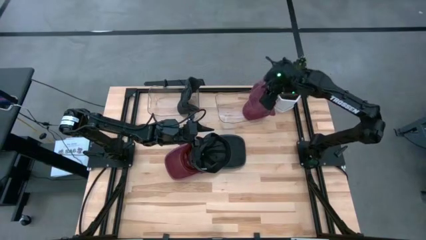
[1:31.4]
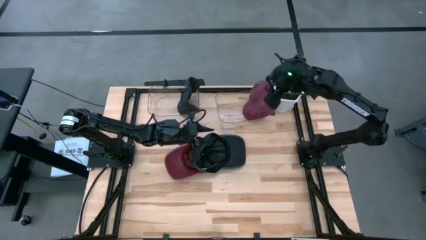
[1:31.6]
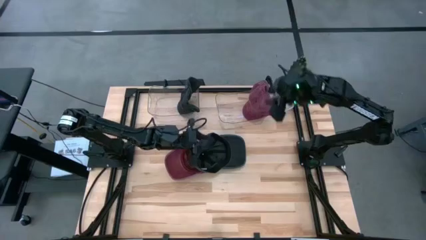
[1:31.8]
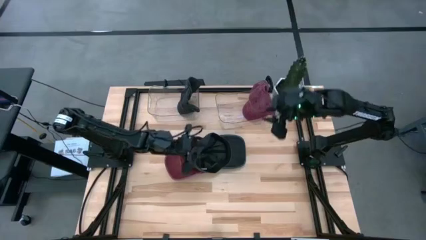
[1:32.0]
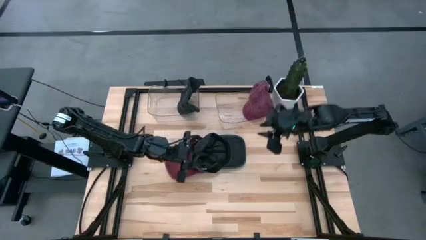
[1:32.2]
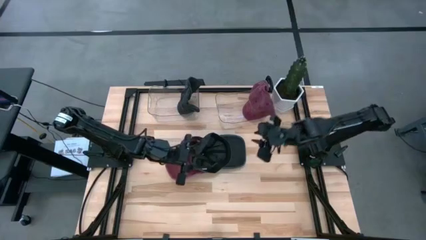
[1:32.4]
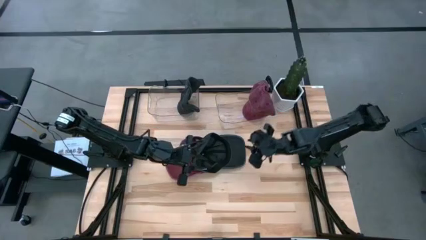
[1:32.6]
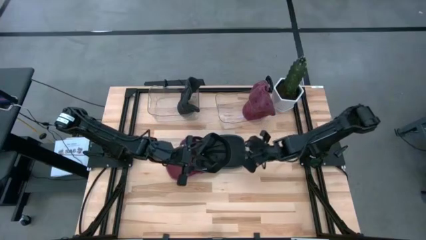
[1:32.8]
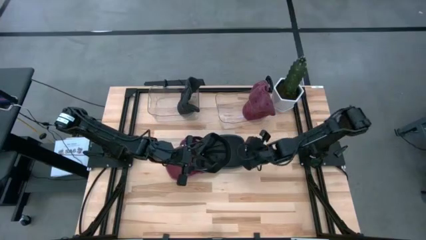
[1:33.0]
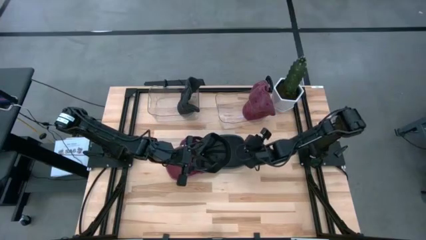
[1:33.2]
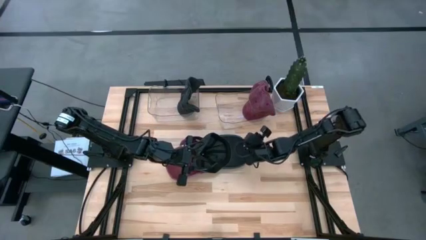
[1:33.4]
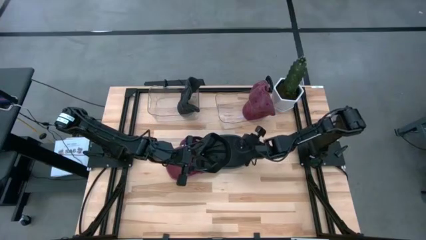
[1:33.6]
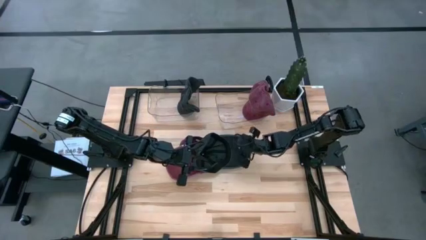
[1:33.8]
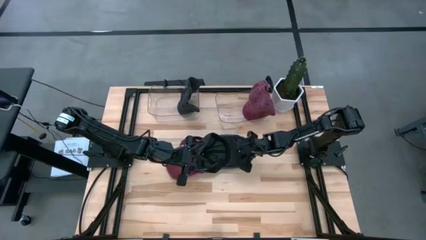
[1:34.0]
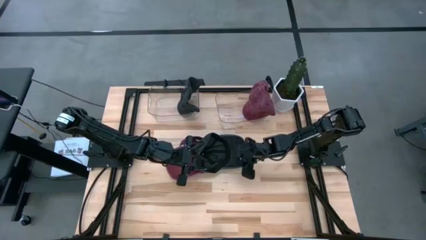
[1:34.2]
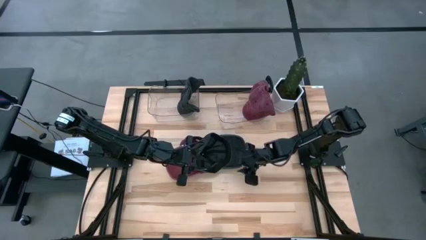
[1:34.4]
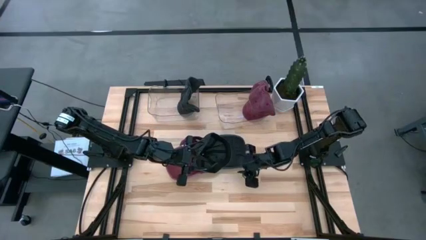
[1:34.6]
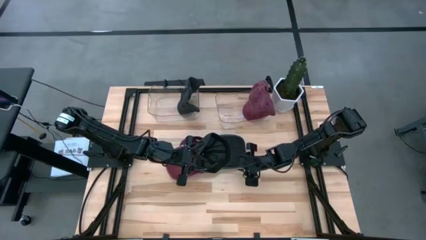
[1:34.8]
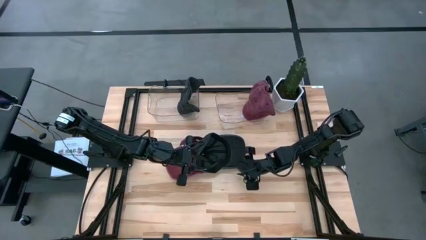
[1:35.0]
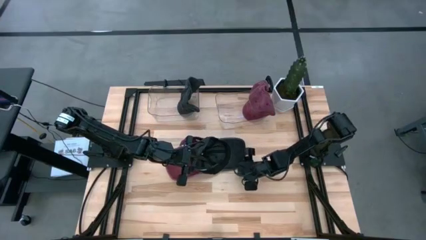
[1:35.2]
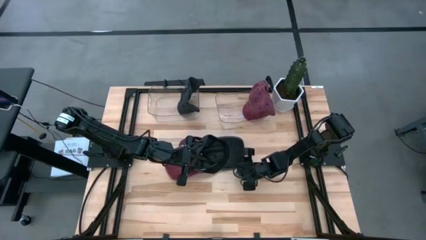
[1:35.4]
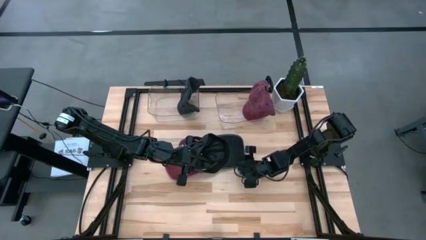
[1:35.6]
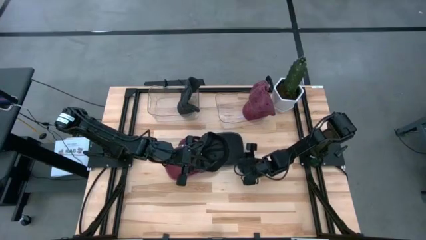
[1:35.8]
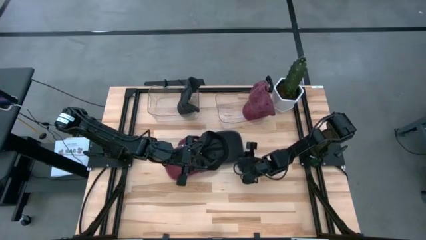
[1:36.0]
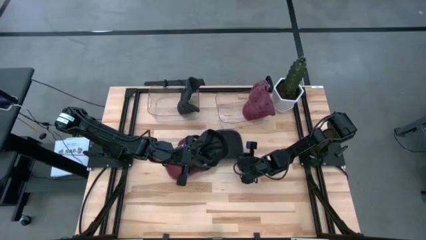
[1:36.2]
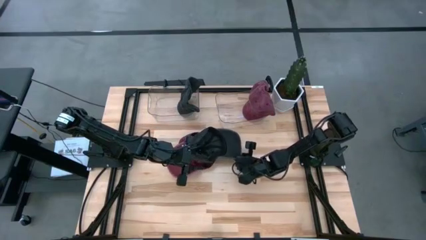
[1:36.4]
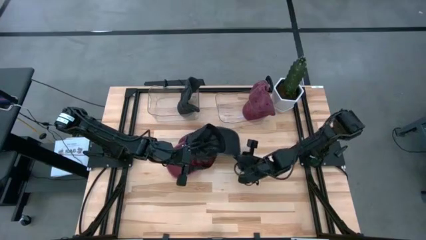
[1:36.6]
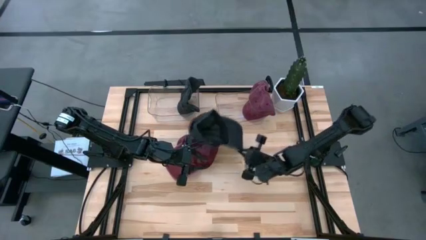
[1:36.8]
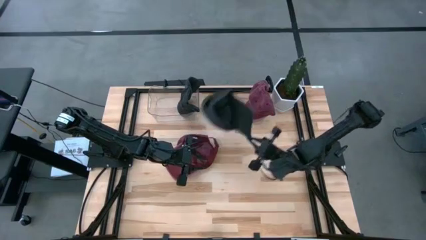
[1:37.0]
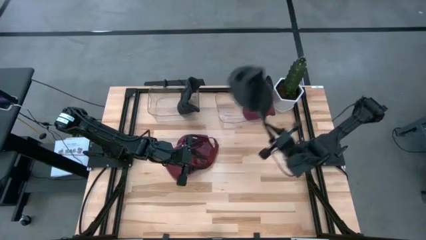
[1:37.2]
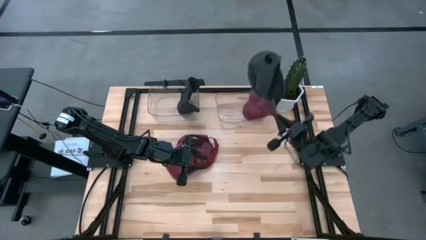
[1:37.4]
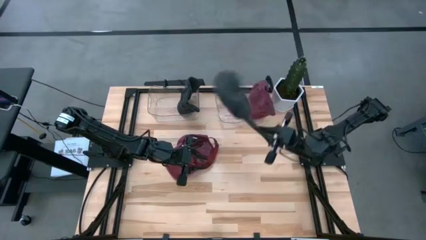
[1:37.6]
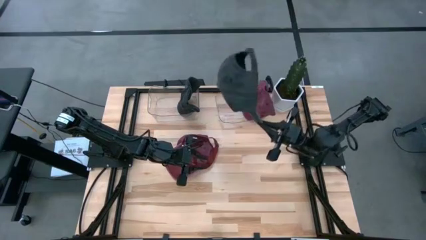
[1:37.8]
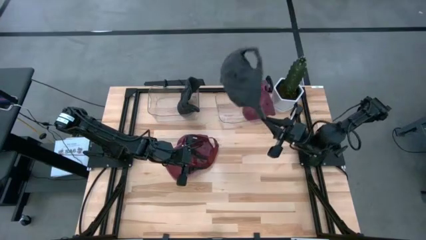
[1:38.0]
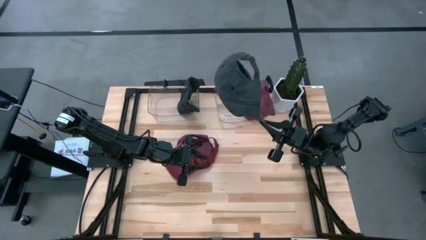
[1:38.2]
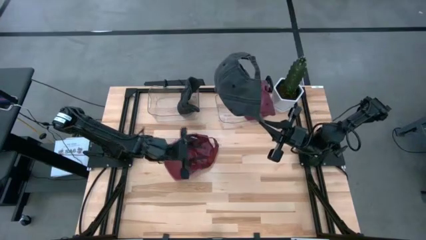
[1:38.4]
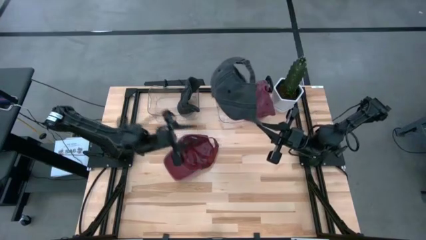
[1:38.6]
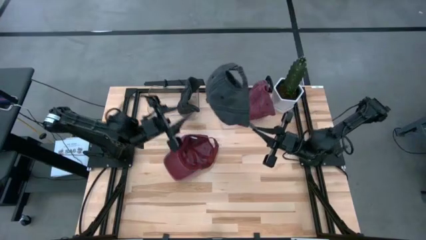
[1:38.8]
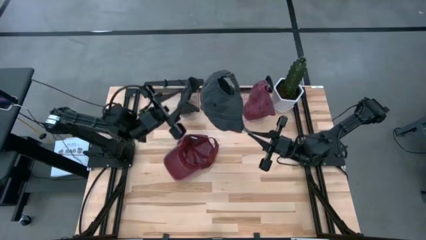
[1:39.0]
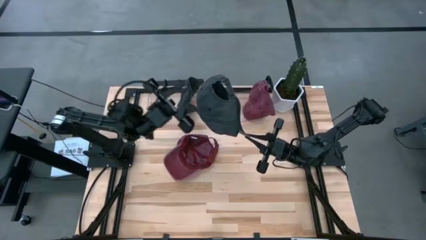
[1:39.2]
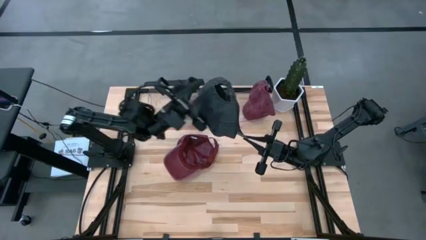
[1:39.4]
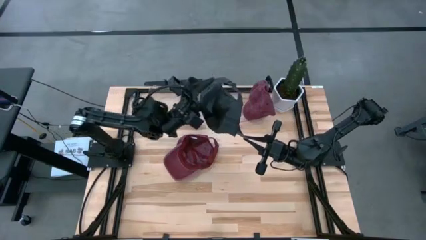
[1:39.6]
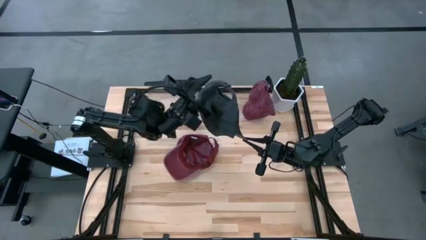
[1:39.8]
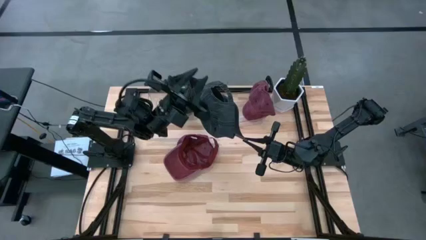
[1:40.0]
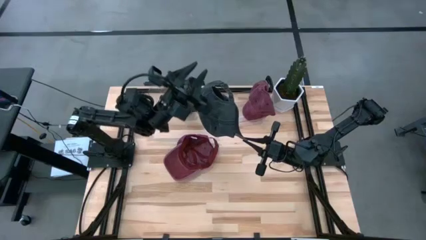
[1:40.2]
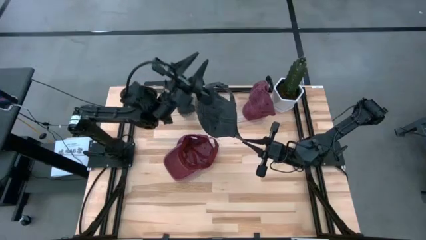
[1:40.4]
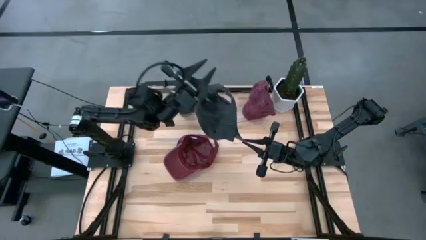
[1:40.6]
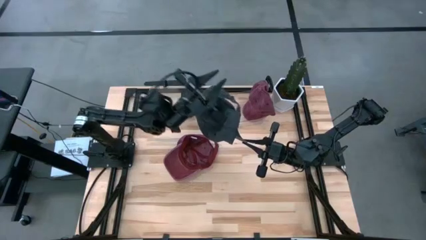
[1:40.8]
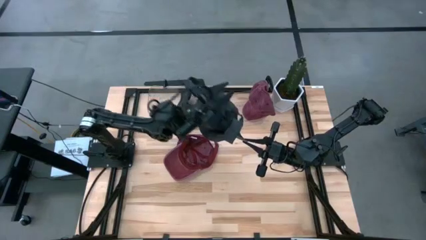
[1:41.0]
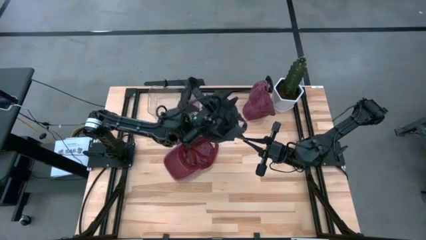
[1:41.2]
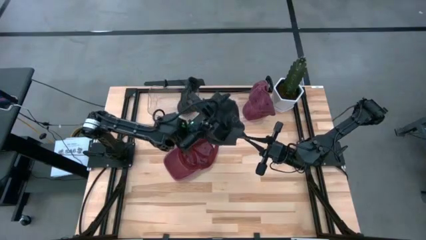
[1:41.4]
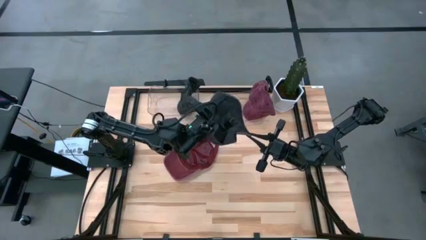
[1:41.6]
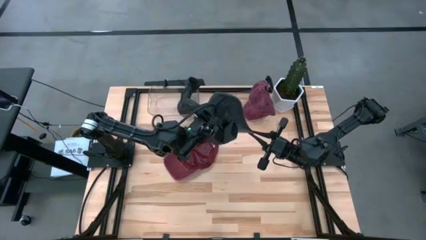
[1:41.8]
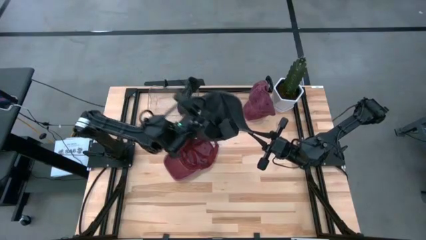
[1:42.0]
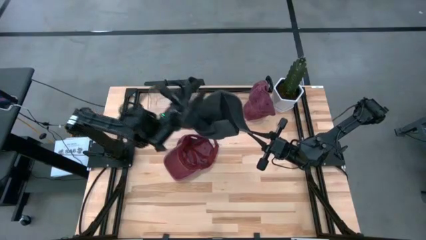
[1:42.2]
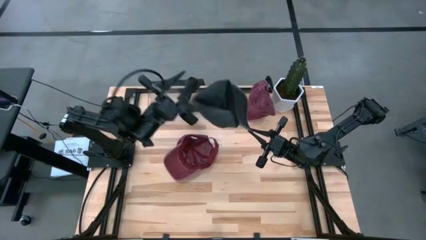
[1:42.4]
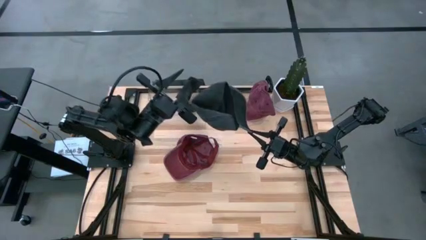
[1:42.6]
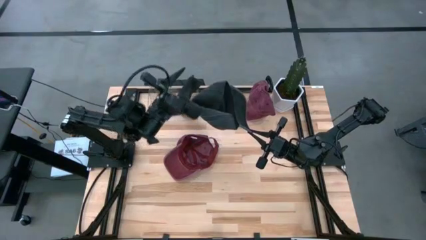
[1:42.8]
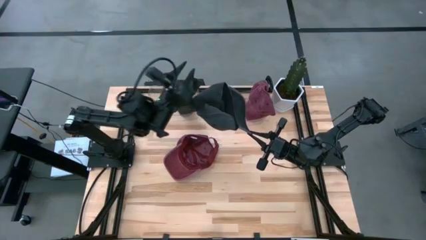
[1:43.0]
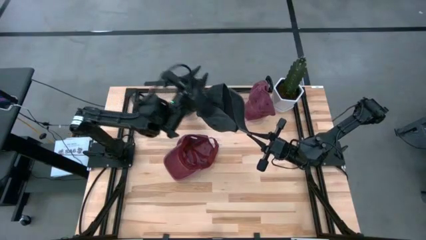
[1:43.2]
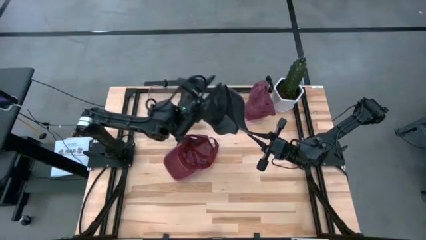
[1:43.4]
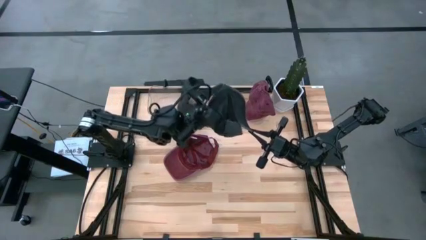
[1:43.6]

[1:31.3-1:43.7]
Task: Pick & Place hat
Put the black cap into the left transparent bin

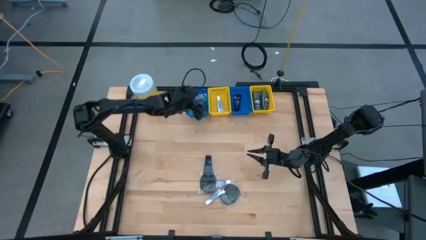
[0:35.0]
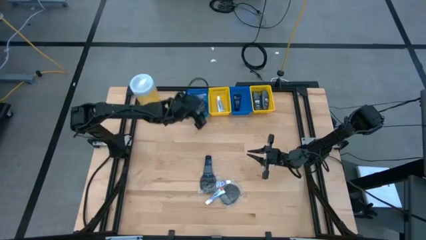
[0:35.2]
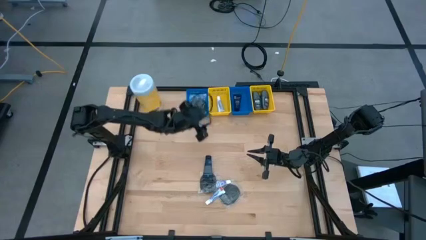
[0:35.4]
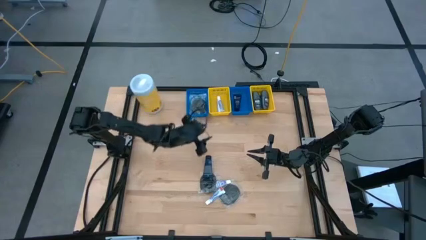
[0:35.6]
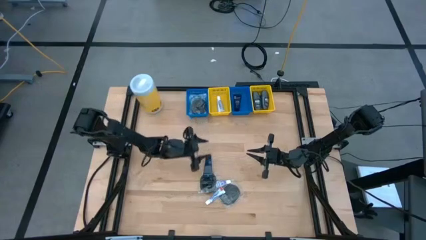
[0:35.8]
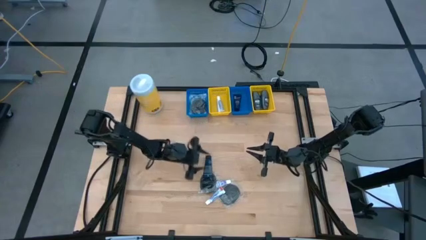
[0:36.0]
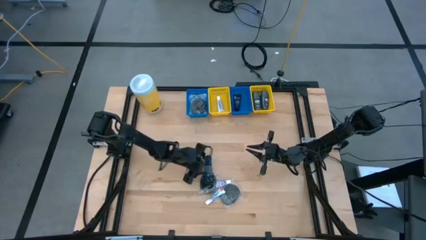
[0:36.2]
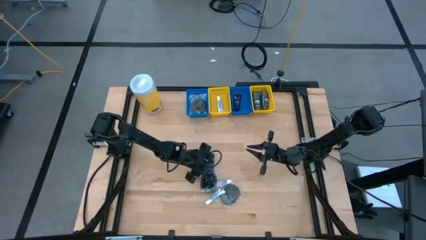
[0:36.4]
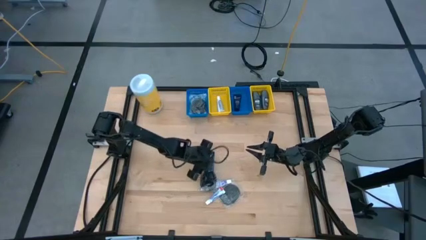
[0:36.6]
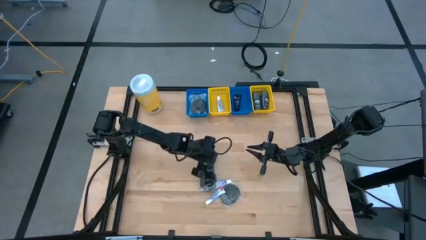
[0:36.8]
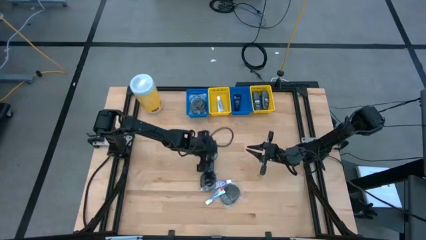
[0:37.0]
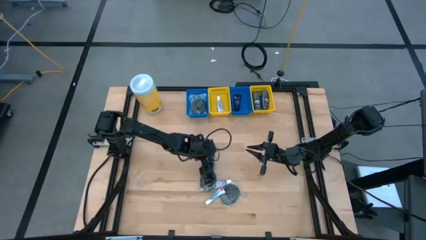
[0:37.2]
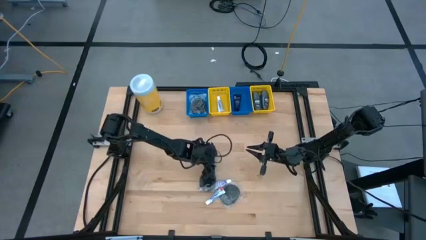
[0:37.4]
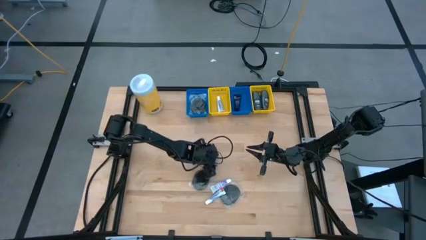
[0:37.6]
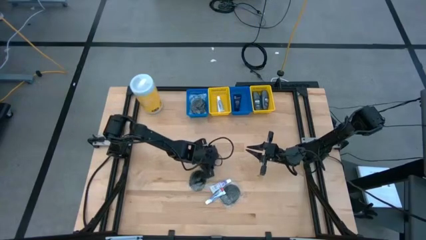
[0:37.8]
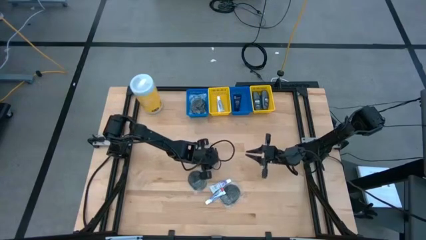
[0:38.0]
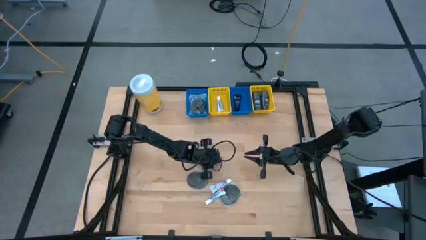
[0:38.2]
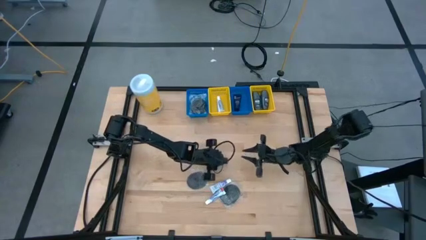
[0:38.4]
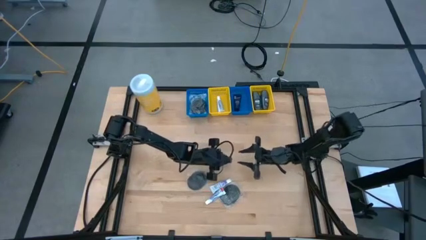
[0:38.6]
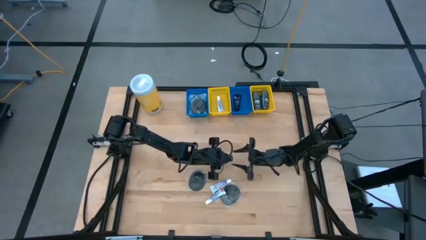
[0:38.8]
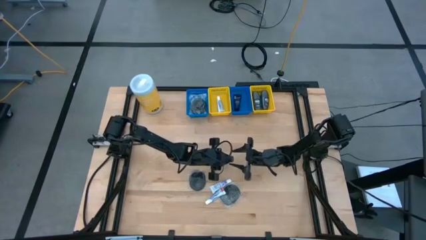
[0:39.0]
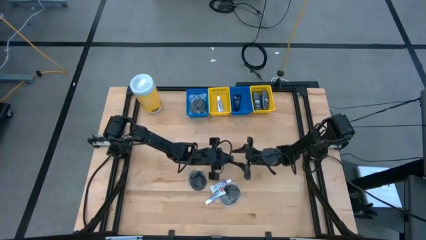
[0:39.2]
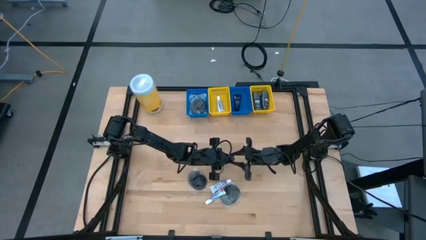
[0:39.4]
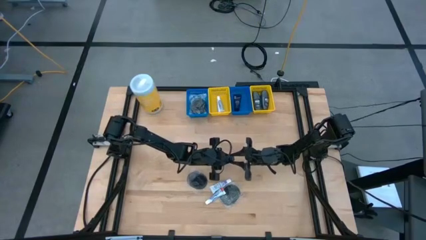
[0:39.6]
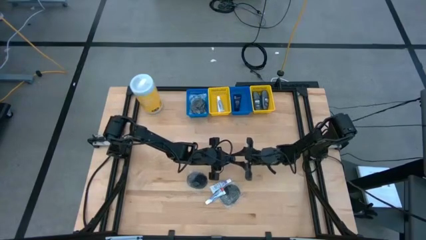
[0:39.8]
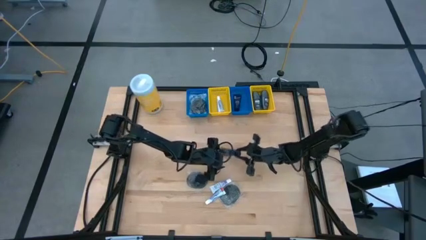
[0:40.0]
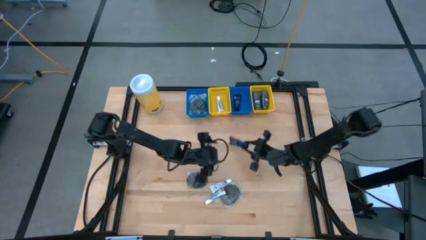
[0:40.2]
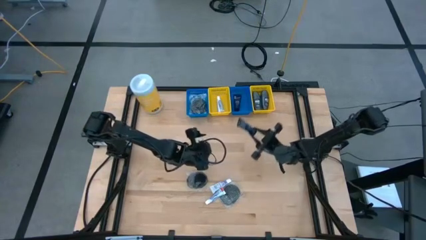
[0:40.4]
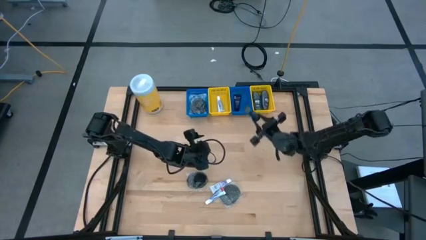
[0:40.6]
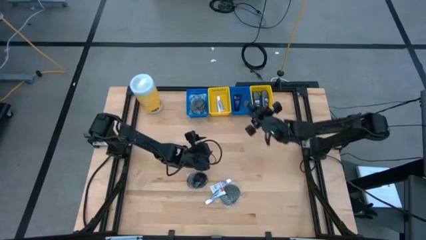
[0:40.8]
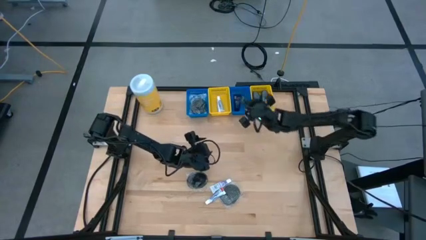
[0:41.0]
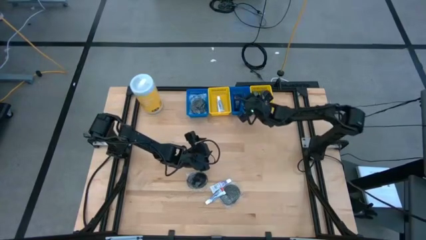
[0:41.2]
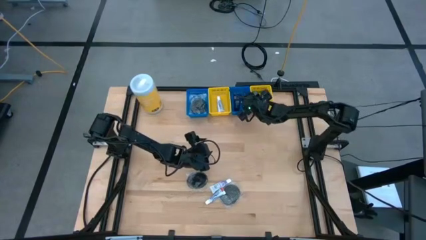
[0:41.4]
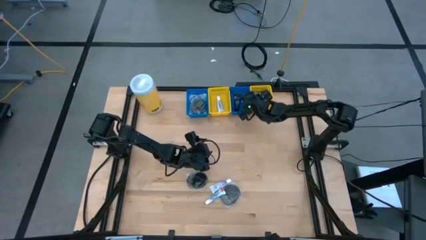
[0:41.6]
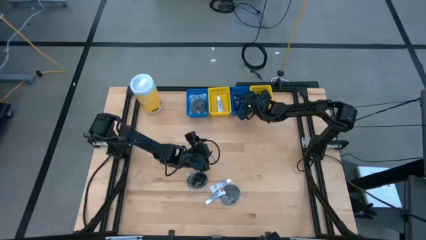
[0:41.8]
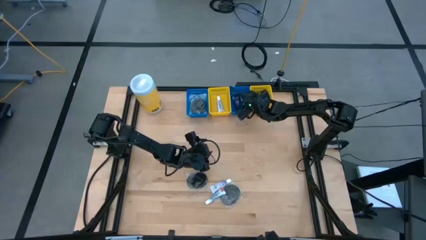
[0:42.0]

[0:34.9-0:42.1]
Task: Pick & Place Travel size toiletries
Put the blue shave cream into the left blue bin
